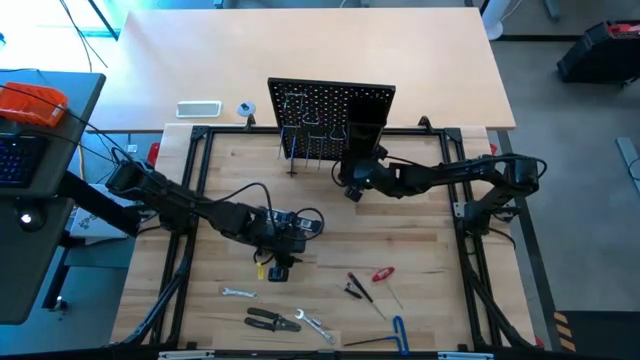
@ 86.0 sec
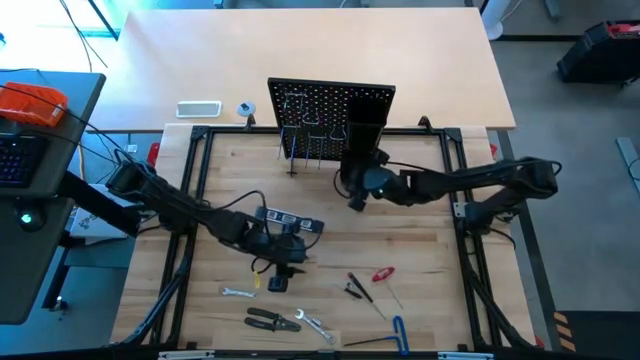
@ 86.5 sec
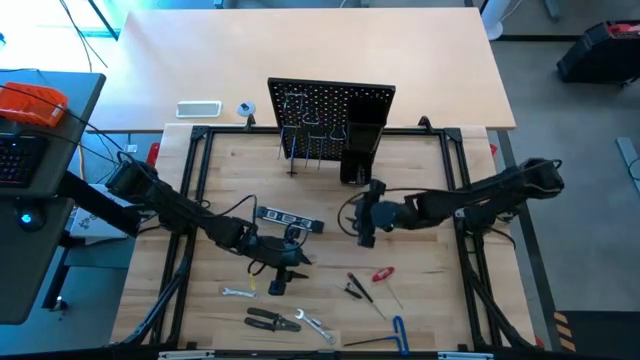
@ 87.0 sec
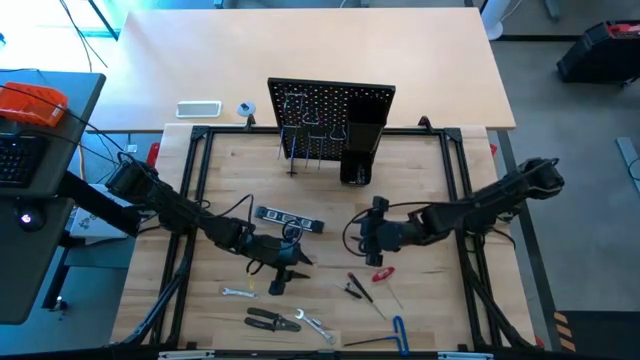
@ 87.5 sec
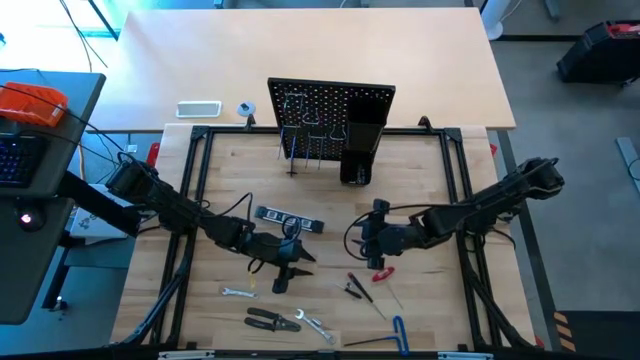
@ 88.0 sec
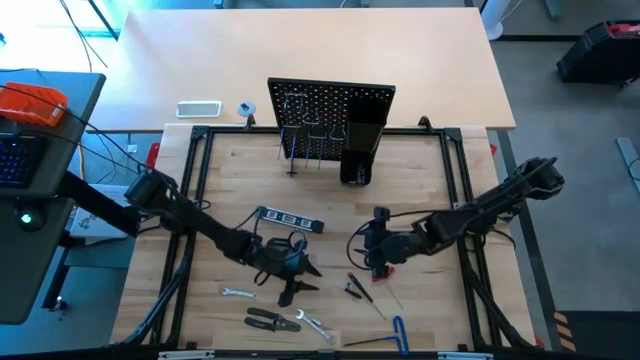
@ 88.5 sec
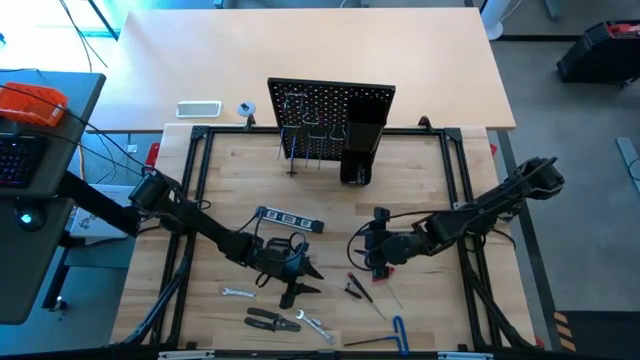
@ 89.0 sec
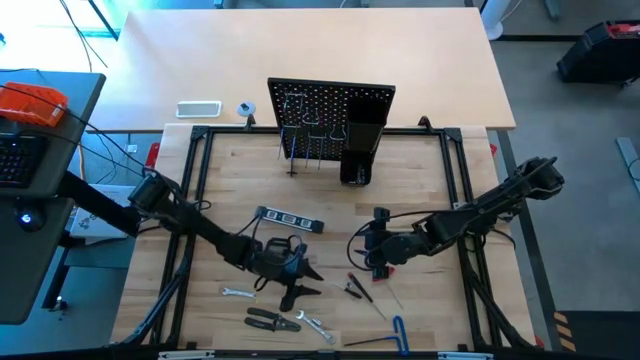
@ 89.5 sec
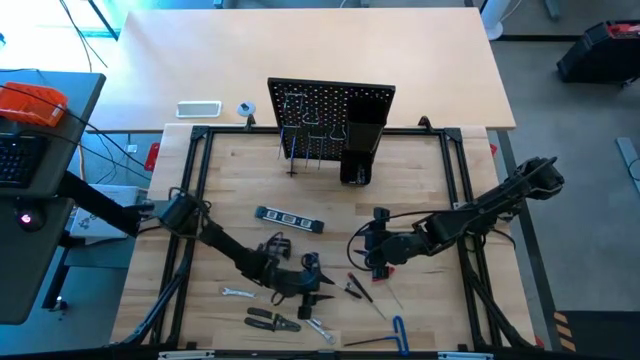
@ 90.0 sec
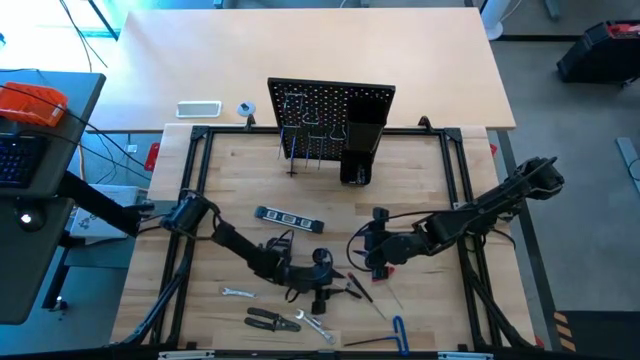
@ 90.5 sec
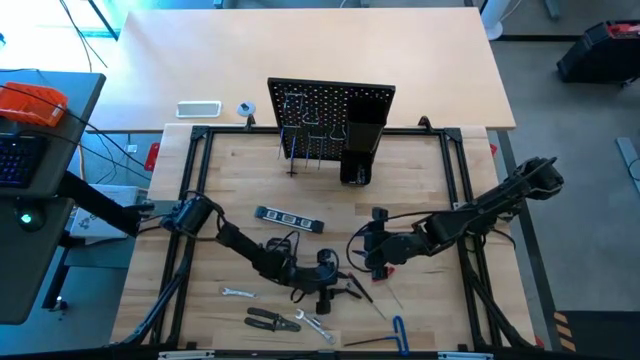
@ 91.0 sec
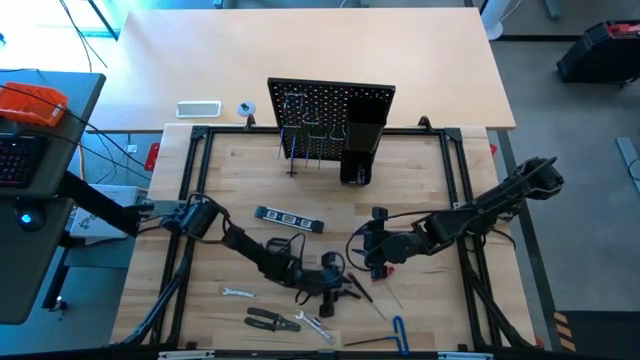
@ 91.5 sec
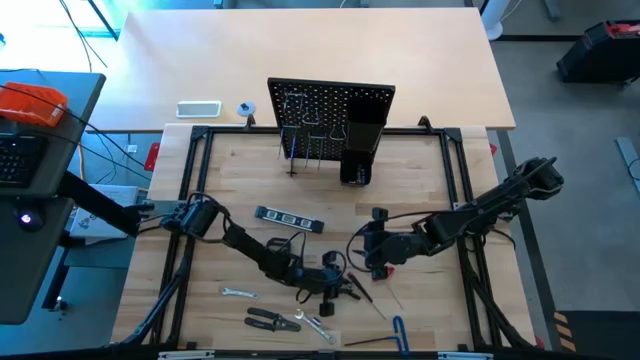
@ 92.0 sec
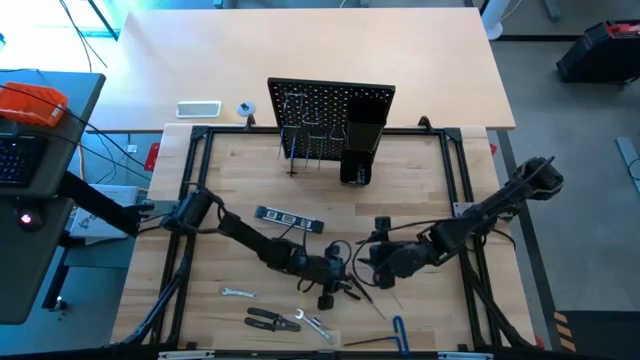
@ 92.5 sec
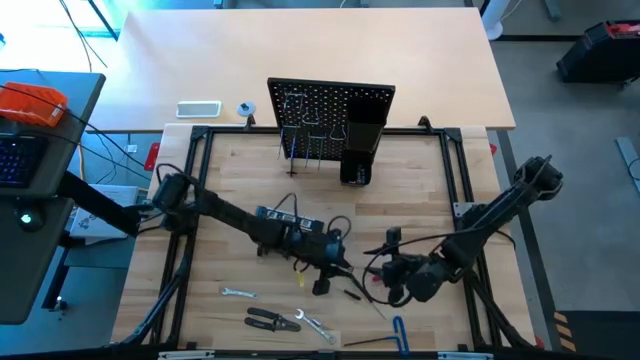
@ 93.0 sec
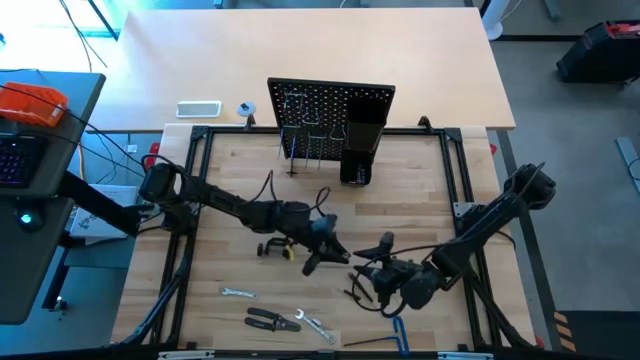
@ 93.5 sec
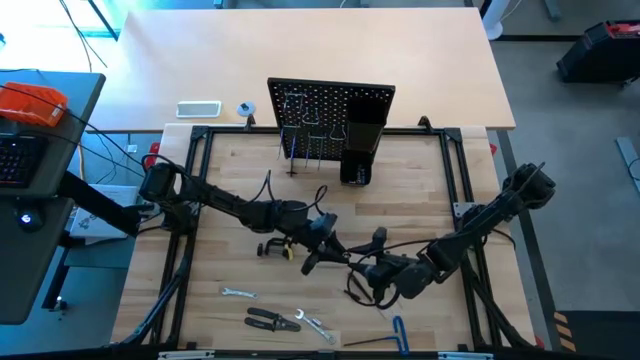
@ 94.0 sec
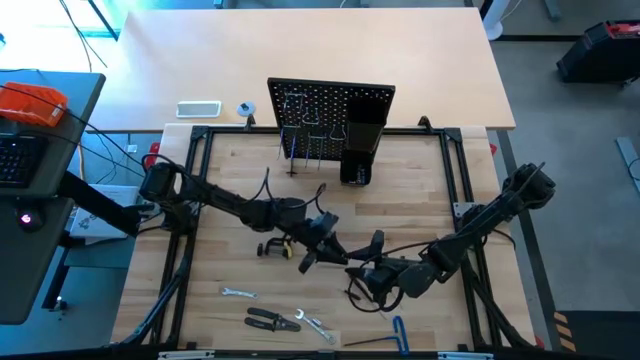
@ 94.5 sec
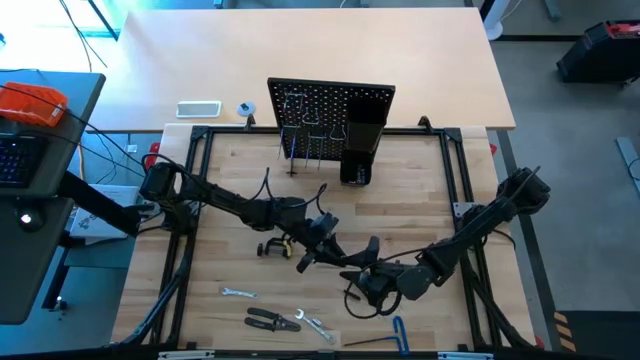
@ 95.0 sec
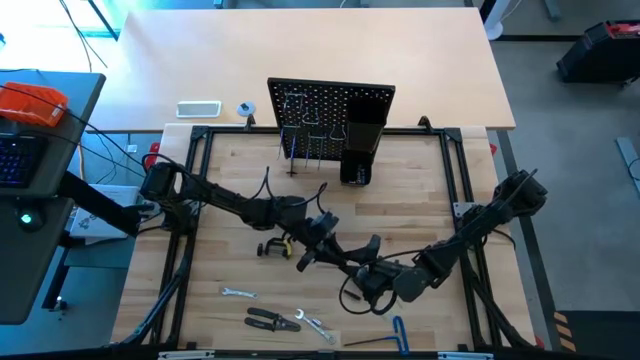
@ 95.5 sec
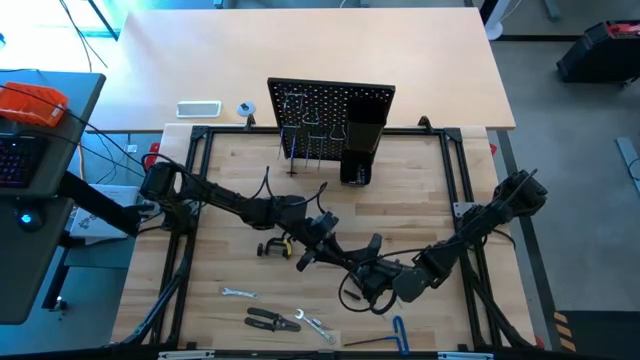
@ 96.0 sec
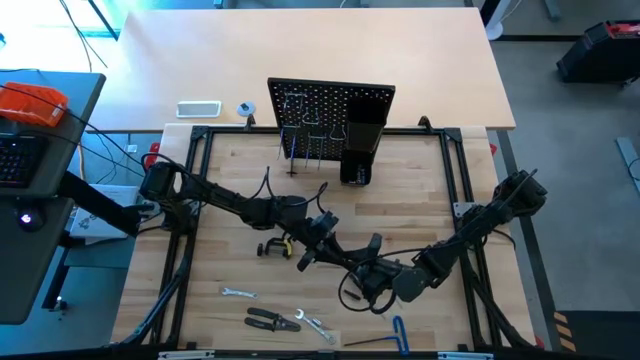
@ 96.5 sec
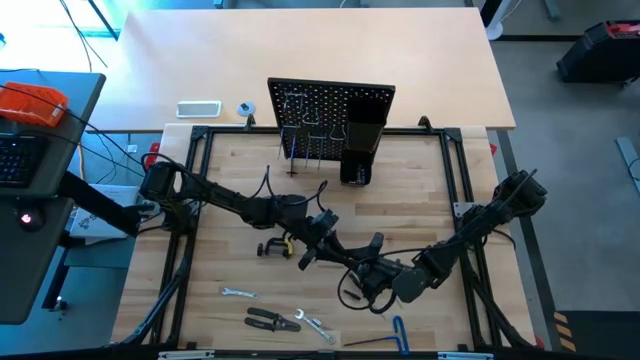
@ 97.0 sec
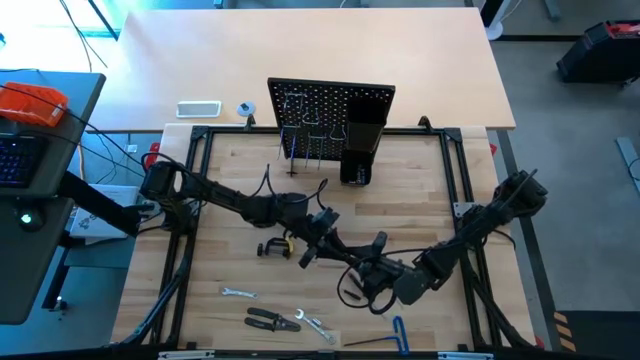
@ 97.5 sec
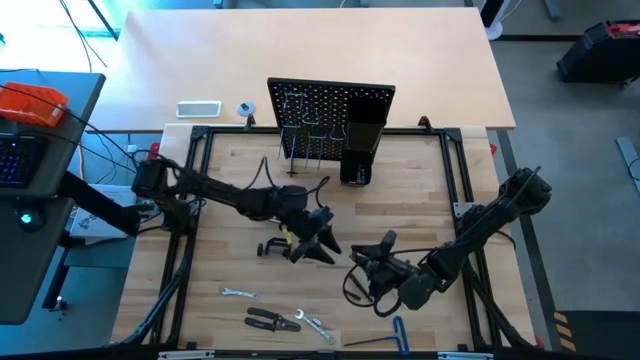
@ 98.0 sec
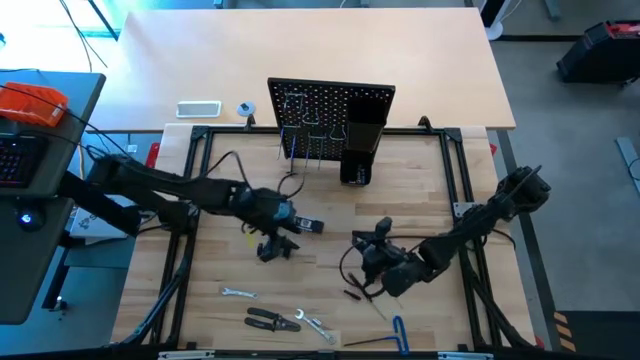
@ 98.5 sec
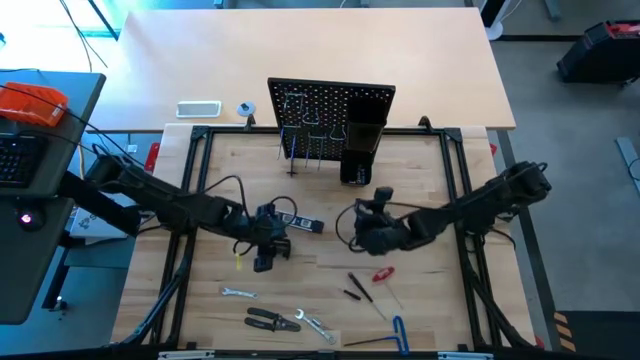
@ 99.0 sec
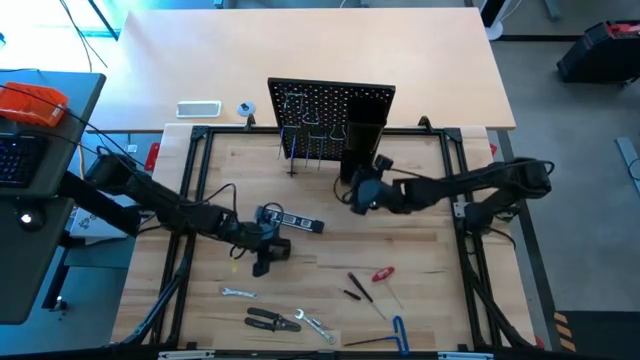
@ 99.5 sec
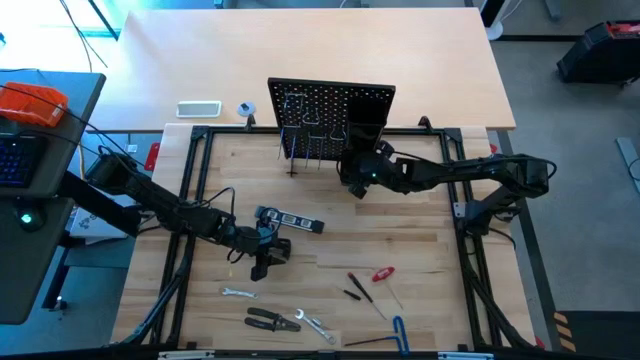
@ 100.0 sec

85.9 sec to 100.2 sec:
Task: Hang tools onto peg board
Put the top socket into the bottom peg board bin

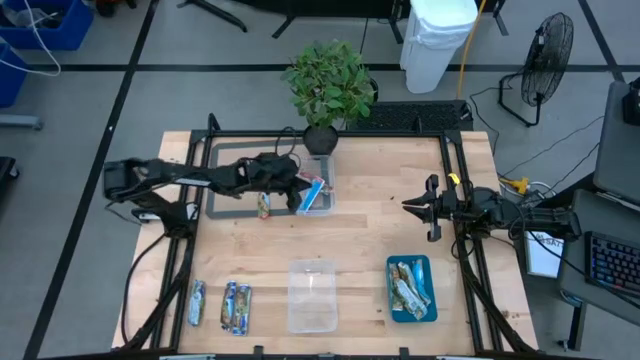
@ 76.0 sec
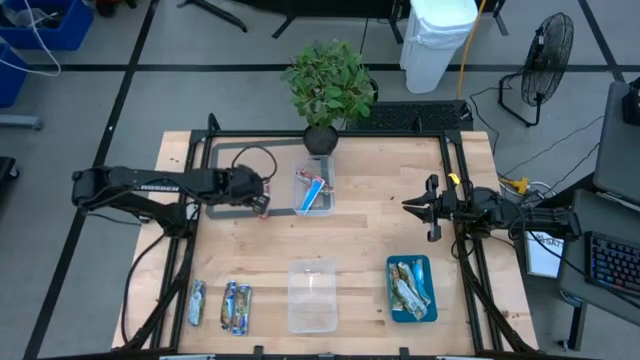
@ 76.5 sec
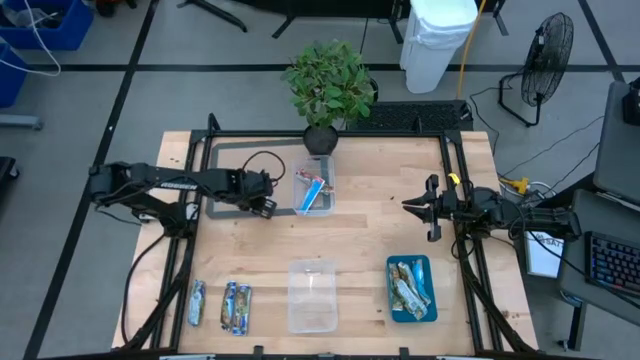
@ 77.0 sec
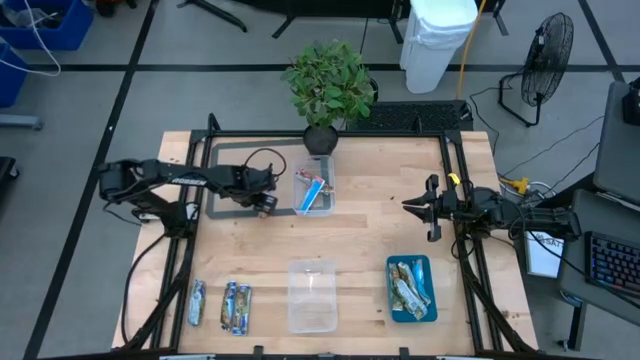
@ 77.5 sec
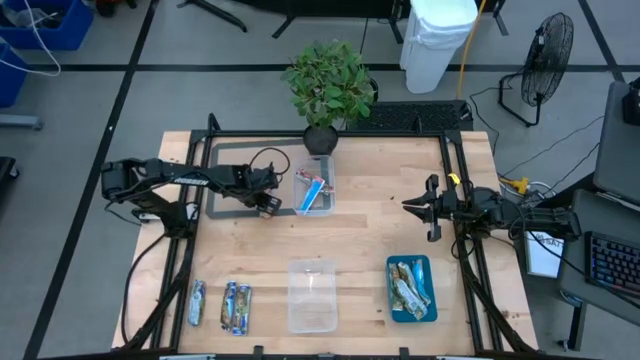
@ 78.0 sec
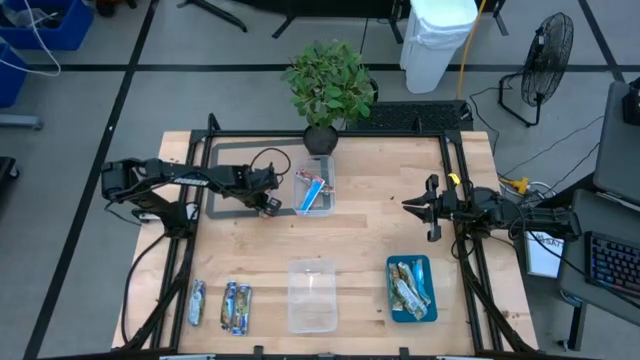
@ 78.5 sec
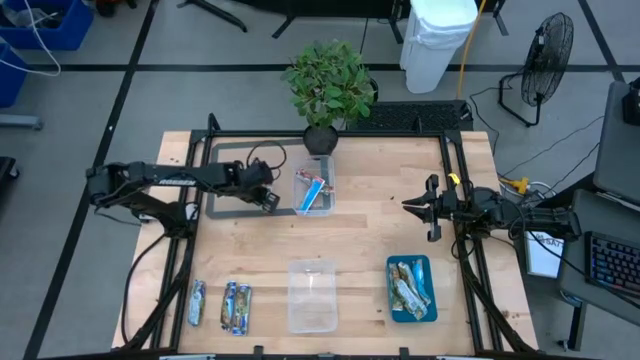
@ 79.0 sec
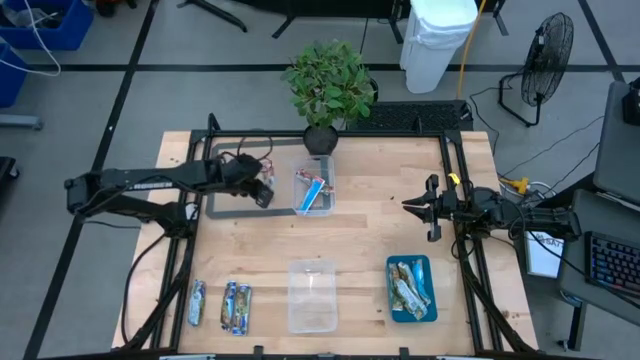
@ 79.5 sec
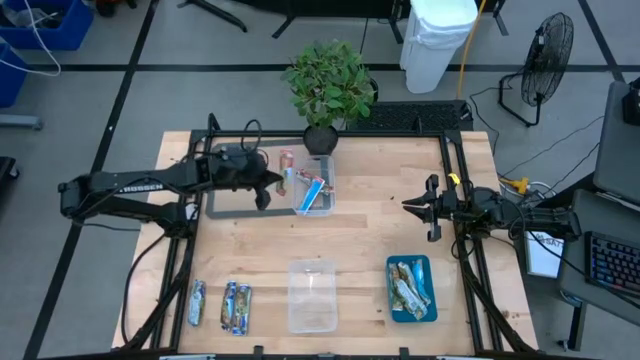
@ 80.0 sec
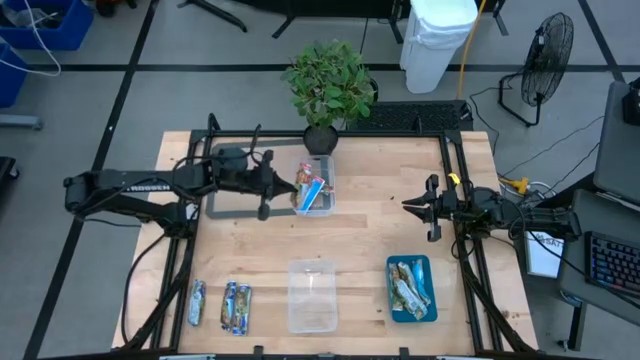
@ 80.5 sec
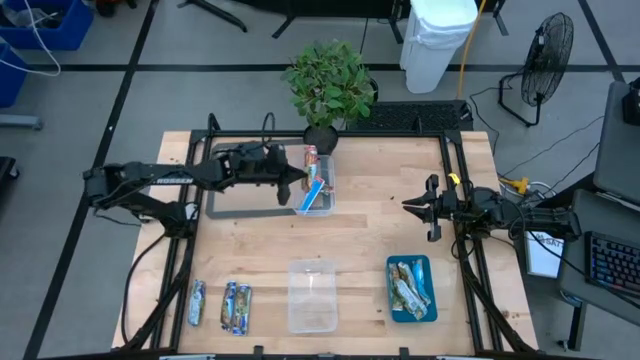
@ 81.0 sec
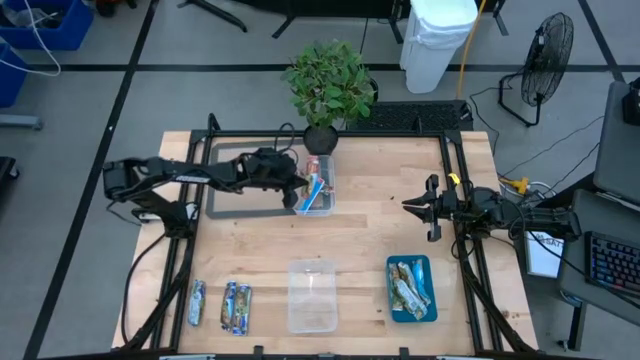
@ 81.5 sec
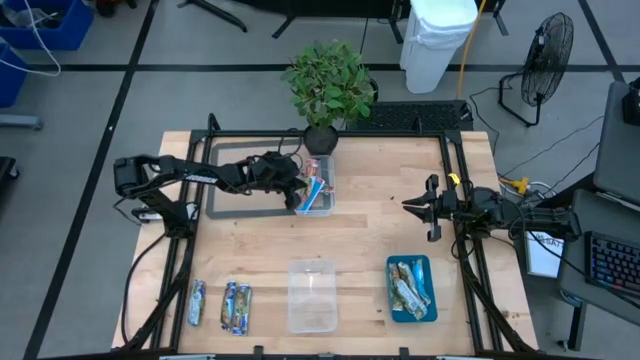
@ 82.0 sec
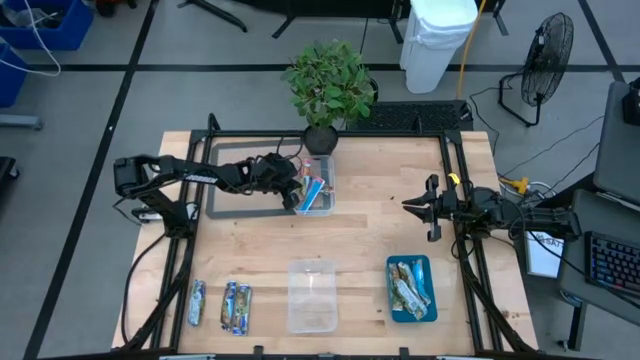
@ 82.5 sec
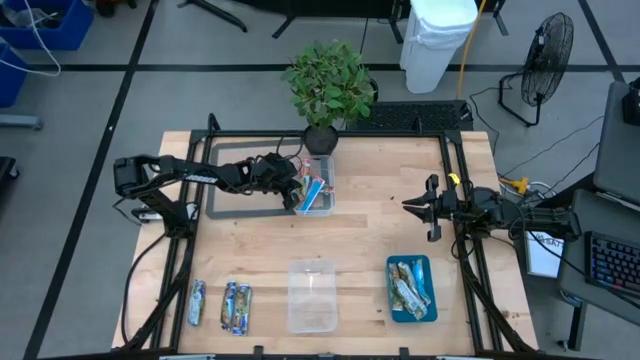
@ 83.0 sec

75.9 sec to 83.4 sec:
Task: Pick and place Granola Bars by type
Put the red granola bar into the top transparent bin
